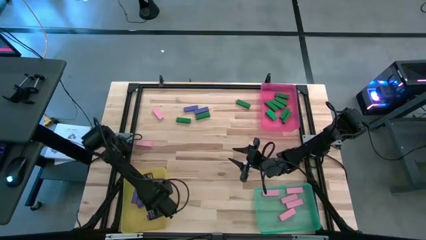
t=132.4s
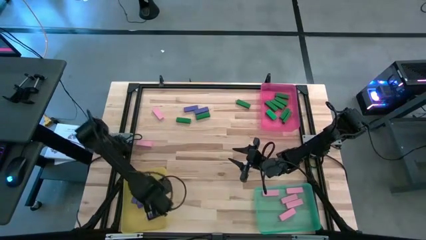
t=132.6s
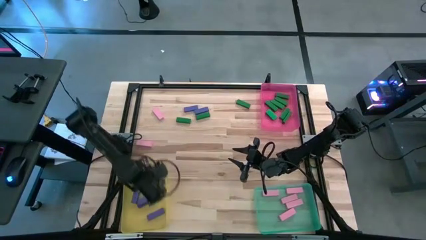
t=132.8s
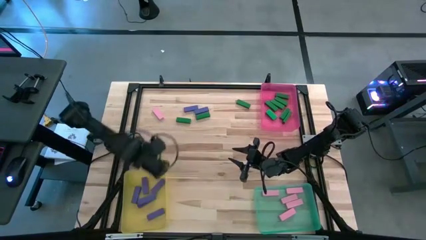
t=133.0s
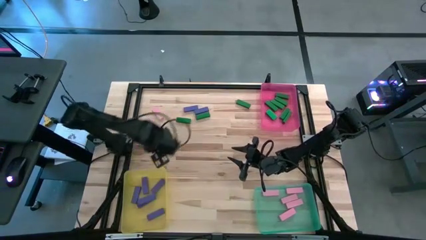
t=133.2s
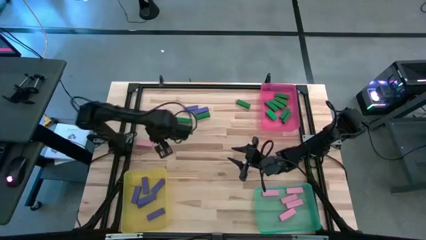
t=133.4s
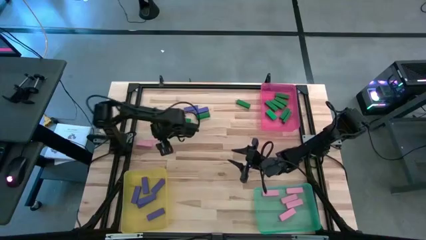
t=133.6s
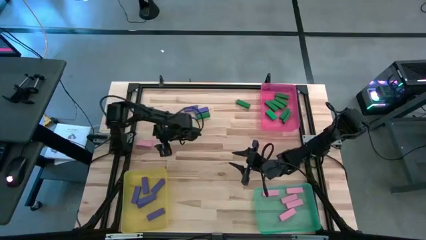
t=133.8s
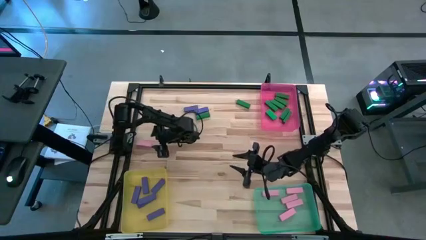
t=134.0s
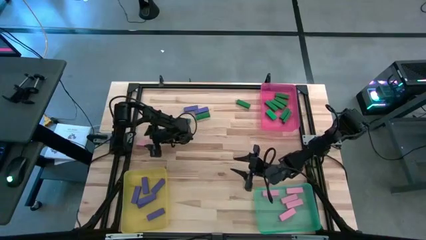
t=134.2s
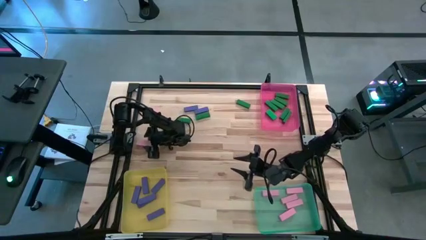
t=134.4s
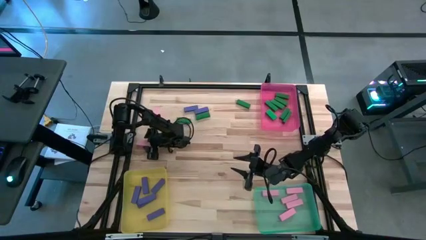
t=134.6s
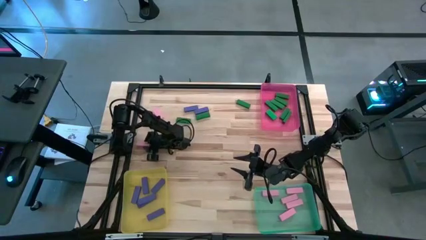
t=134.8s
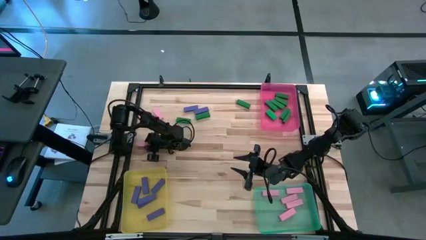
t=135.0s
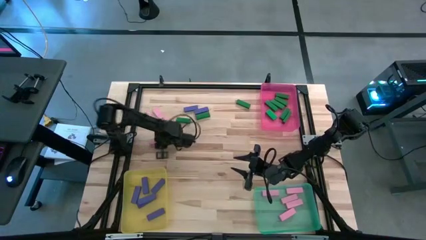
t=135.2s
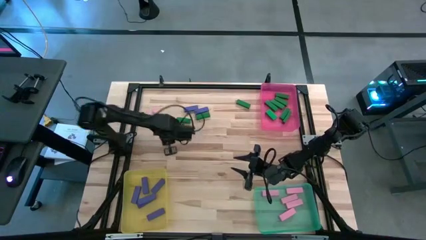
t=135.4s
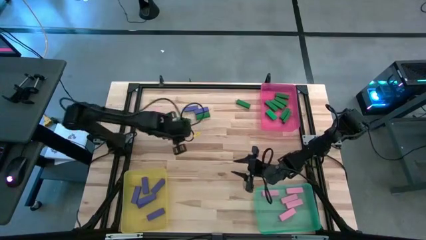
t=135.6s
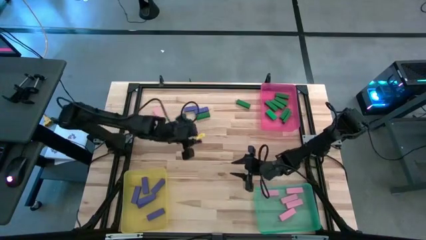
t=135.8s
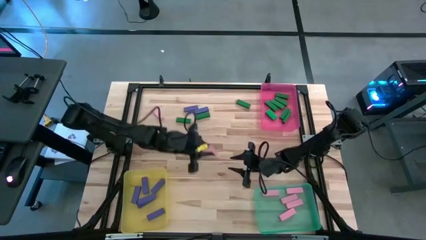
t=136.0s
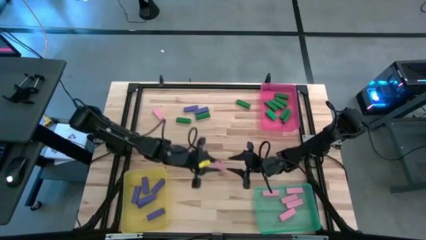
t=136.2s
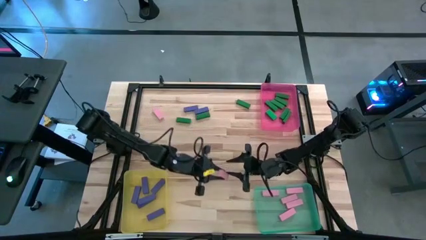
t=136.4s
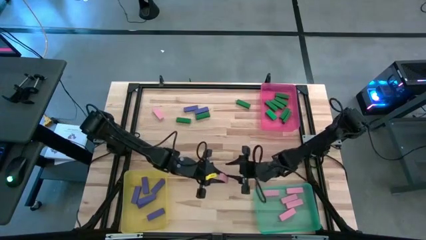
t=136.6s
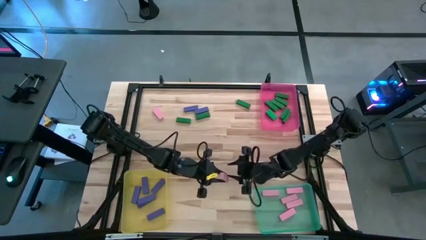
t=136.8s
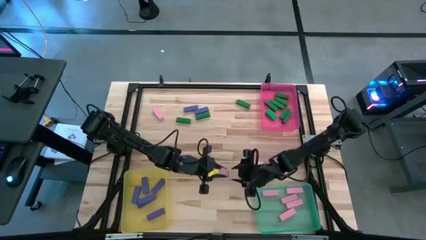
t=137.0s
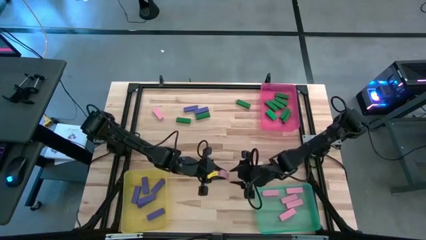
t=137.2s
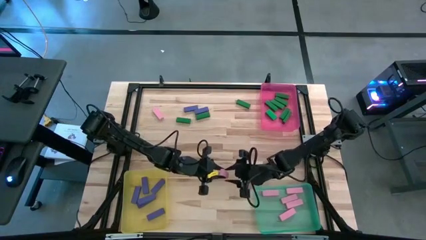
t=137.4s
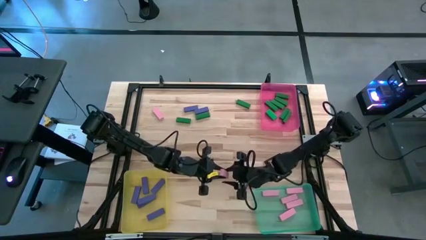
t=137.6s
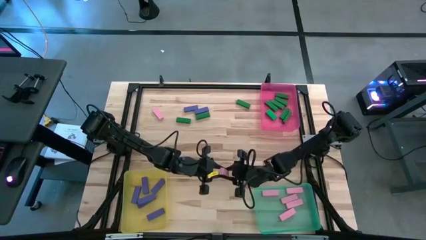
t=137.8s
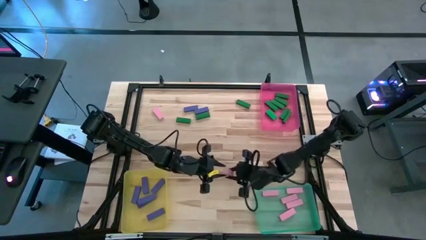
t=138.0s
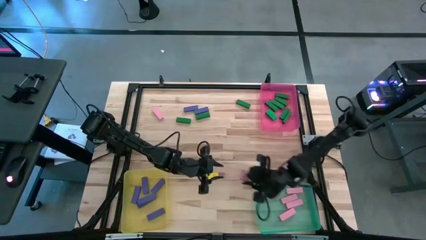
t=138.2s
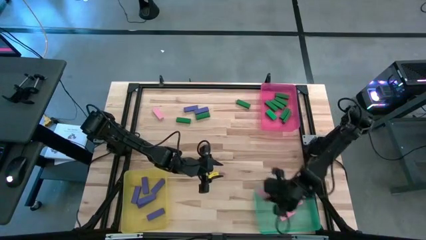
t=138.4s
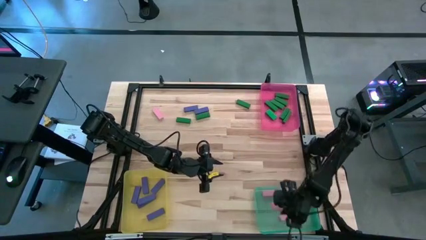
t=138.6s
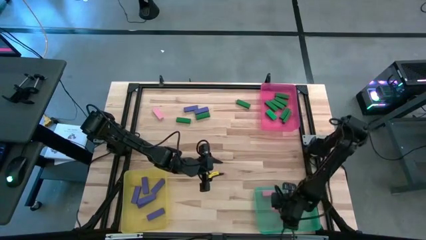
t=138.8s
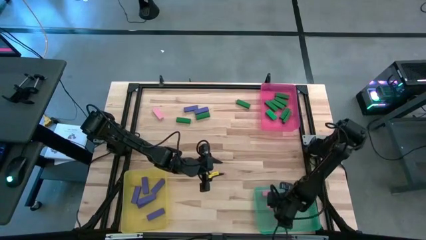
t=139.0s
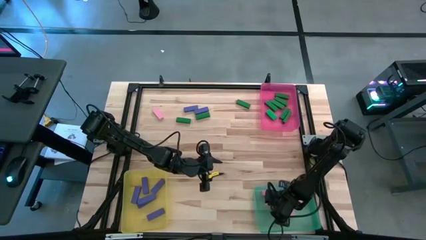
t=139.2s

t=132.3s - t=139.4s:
Task: Sort blocks
Put the pink block into the green bin

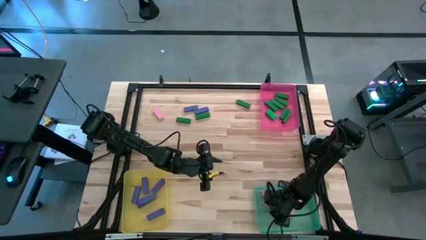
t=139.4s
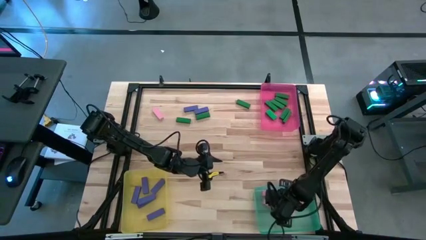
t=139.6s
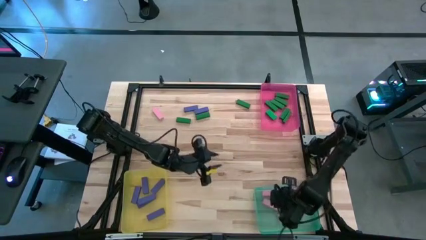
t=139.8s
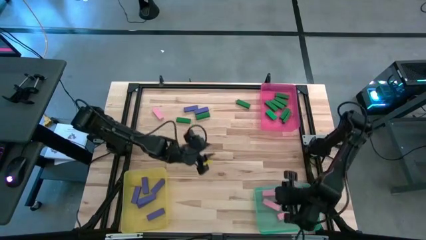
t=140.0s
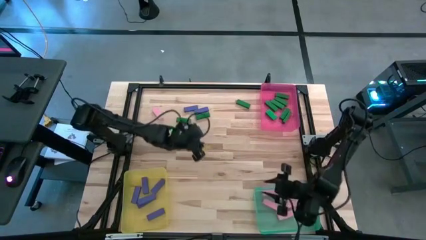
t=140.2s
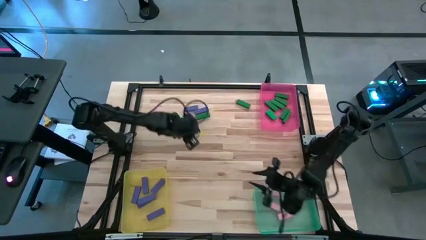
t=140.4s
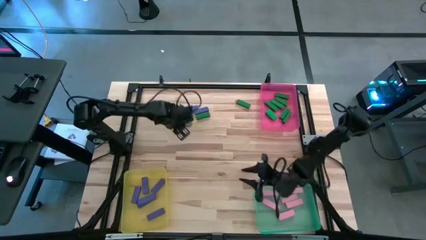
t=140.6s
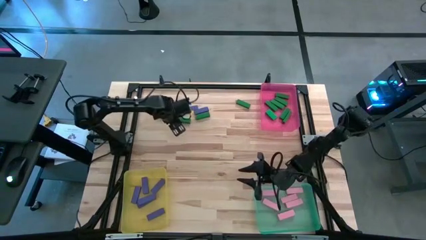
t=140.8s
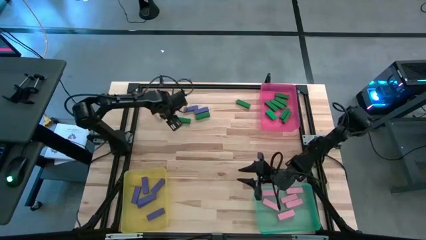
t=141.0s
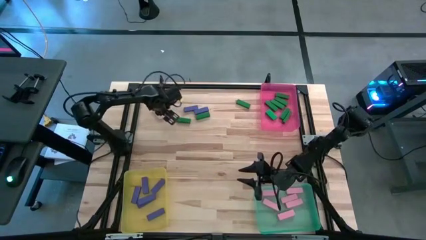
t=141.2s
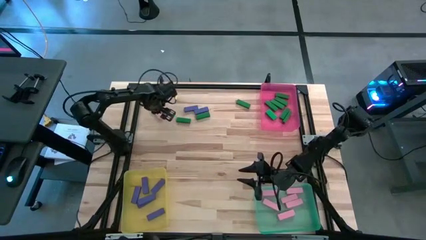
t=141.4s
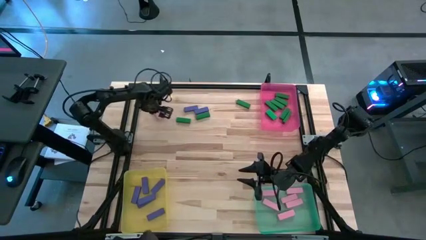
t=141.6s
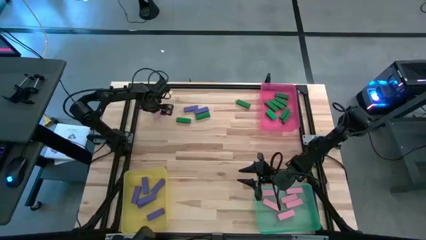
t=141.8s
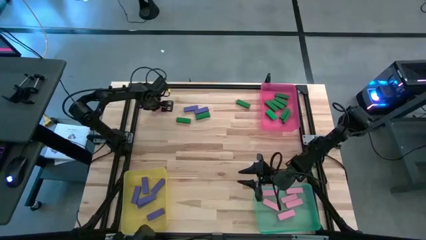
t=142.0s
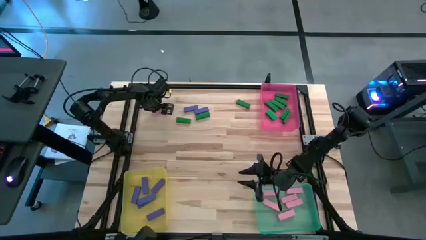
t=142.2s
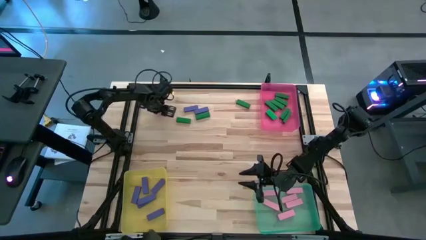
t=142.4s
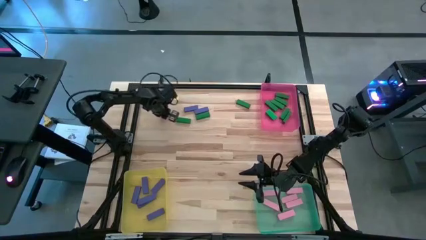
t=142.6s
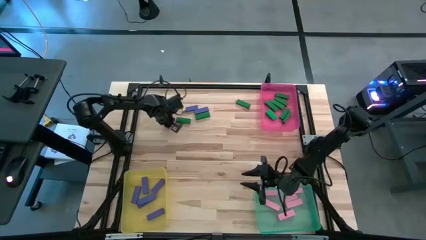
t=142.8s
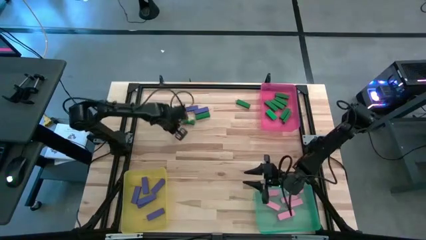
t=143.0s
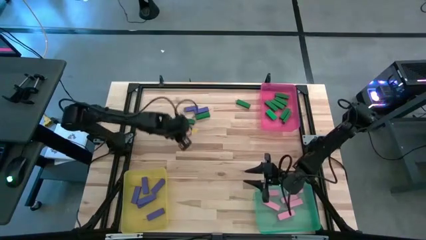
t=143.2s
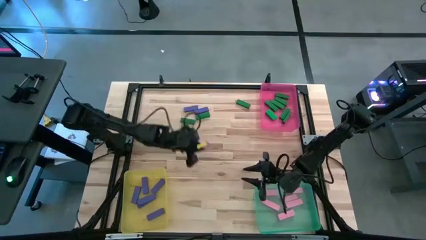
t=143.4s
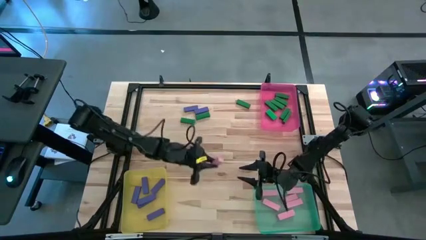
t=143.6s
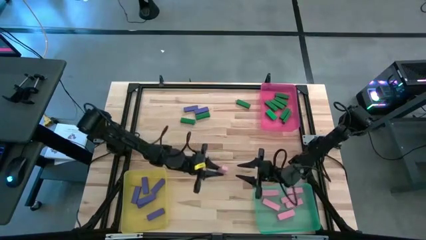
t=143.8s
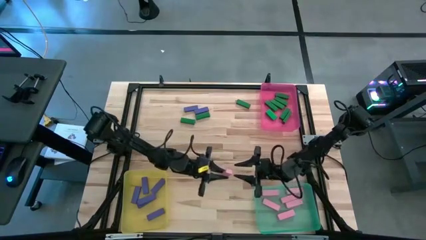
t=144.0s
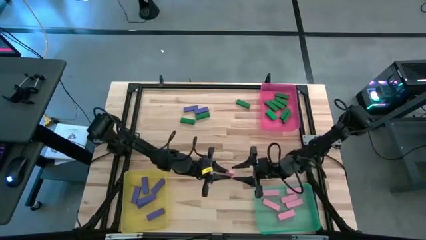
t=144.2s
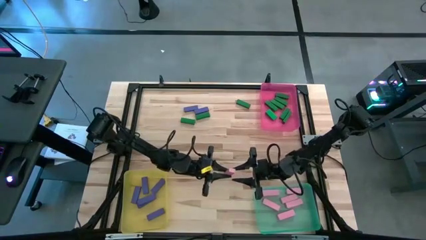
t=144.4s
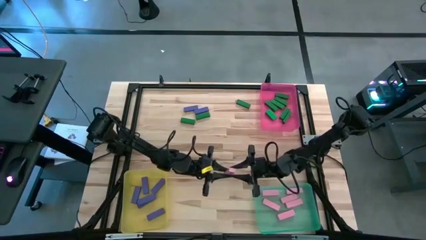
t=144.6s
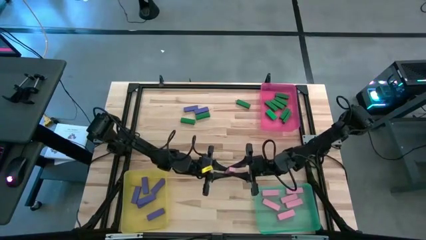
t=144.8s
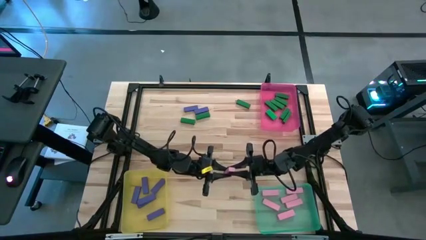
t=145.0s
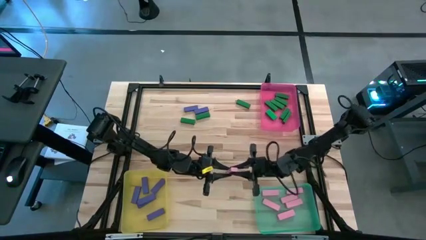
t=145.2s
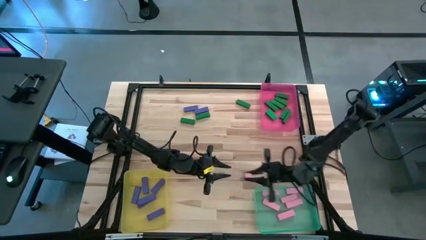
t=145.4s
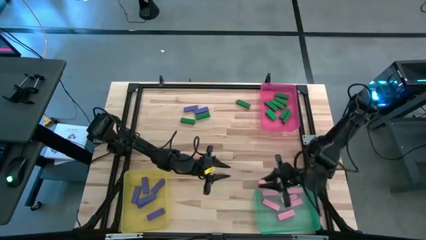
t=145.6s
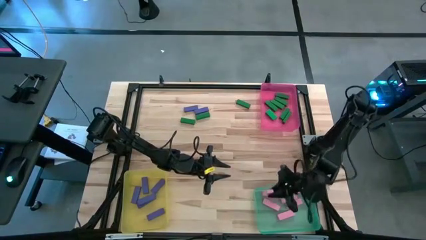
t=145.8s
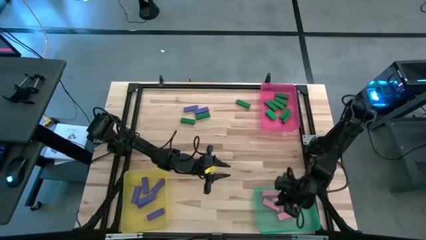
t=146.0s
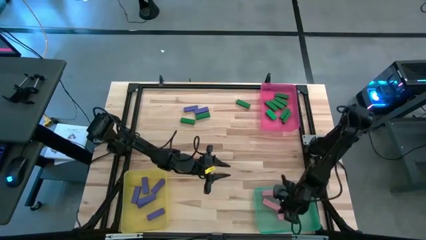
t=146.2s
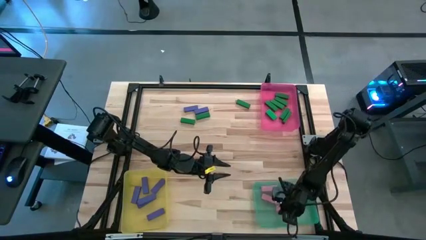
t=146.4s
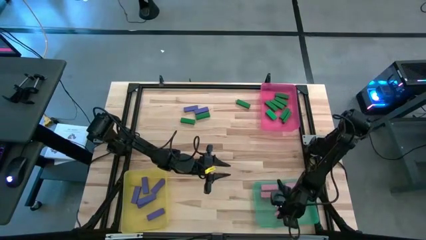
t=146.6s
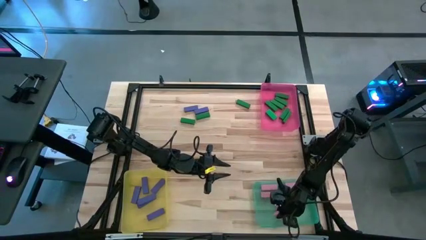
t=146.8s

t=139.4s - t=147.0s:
Put the pink block into the green bin

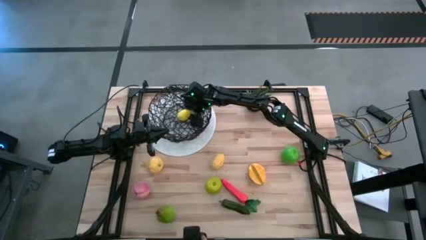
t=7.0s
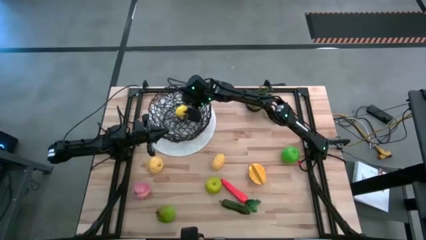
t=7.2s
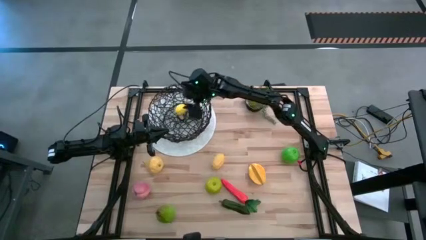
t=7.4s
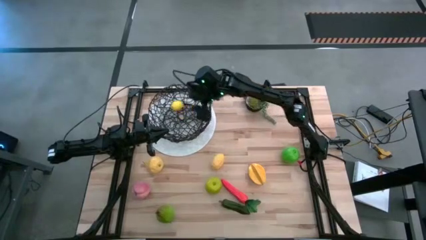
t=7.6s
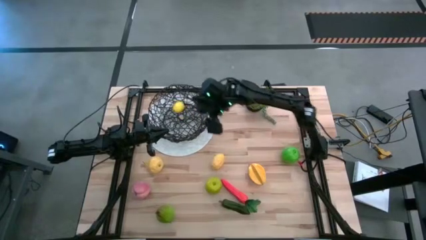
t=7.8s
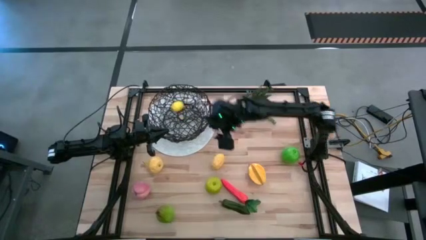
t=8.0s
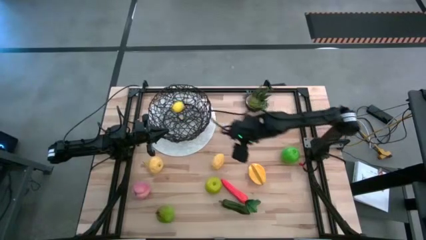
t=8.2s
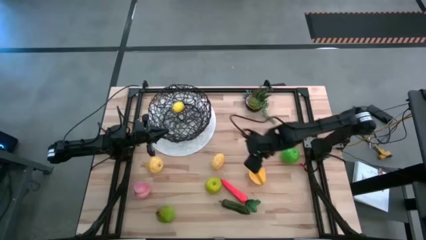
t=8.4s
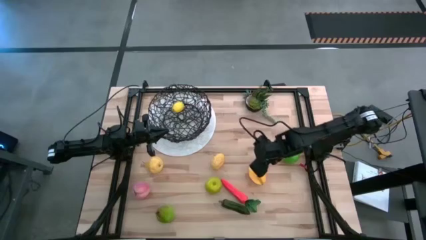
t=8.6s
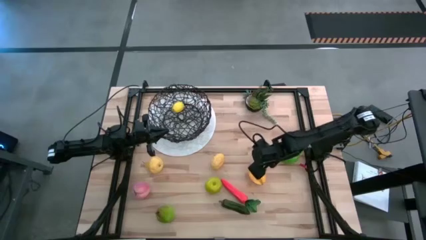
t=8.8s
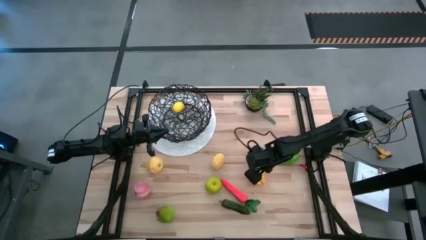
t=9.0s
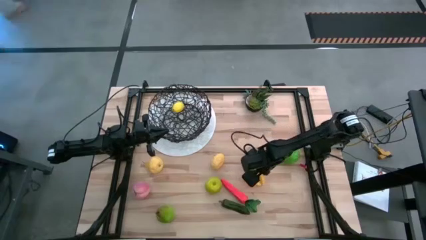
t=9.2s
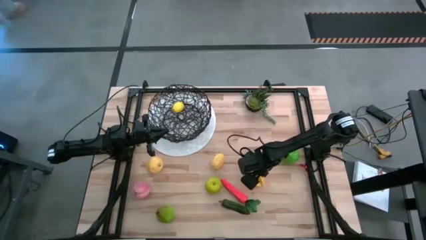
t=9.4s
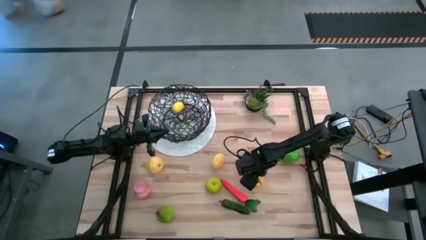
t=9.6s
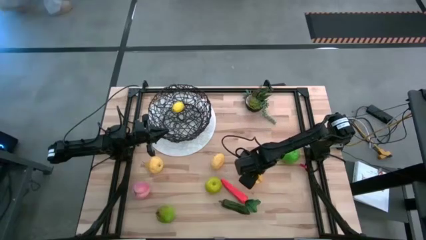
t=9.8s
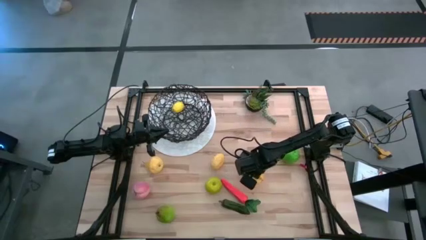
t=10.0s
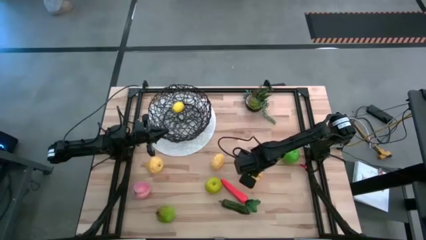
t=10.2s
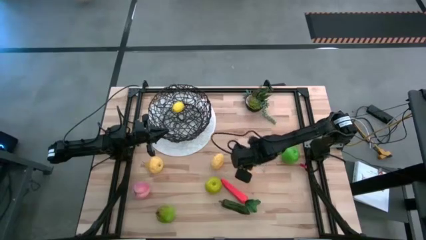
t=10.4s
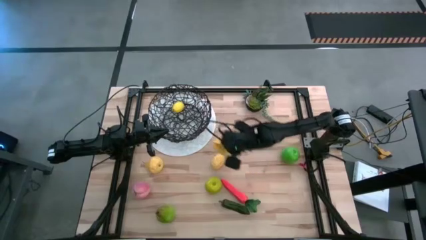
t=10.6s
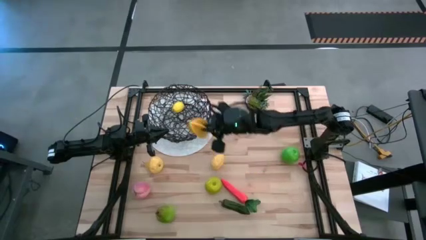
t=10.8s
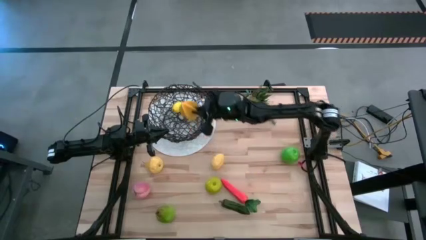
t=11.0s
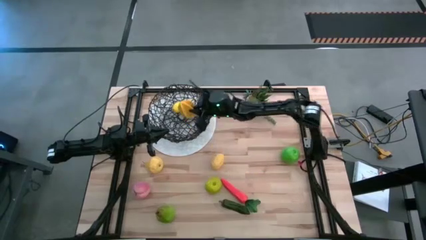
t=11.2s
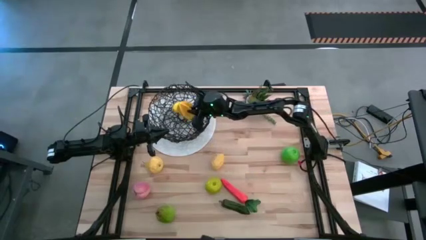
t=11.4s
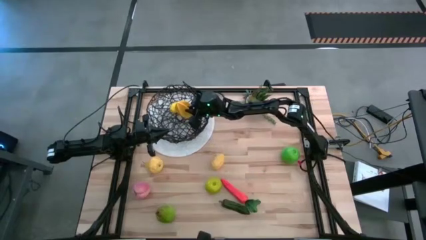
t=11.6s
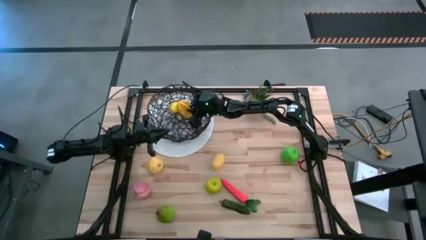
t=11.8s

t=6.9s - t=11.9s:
Task: Build produce basket
Put the yellow star fruit into the wire basket
